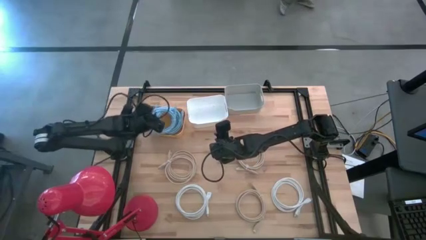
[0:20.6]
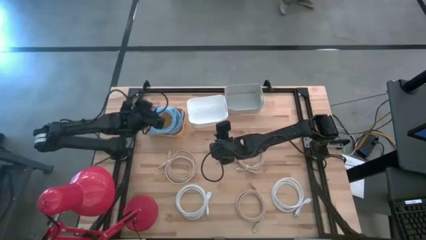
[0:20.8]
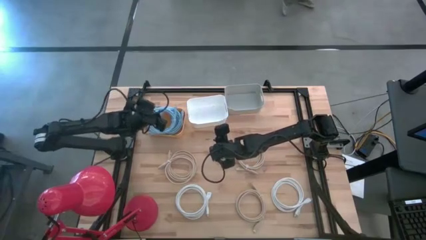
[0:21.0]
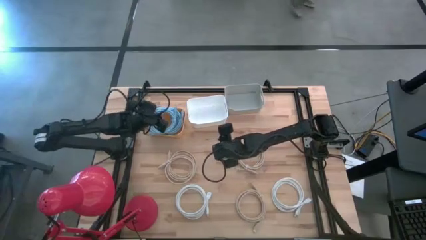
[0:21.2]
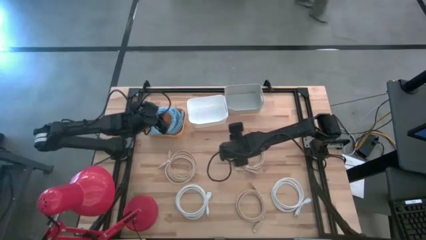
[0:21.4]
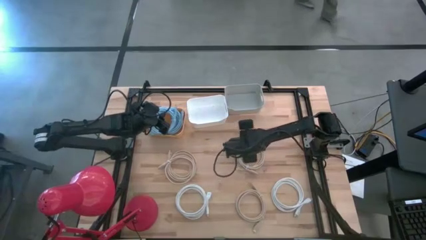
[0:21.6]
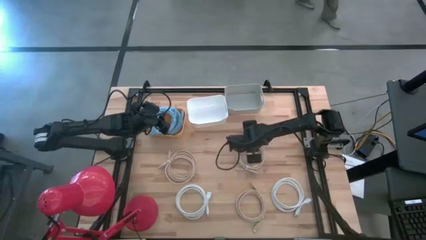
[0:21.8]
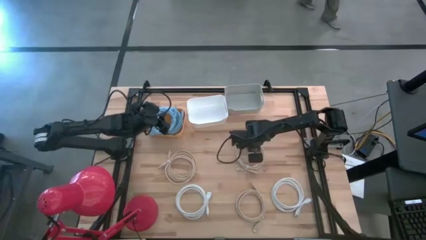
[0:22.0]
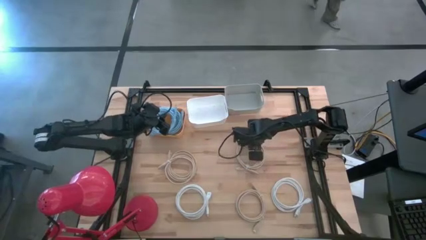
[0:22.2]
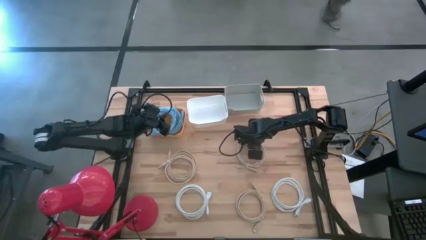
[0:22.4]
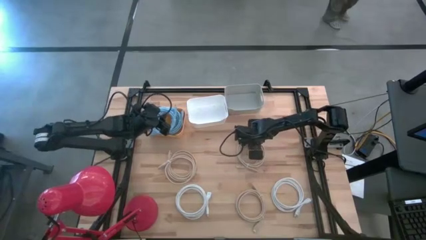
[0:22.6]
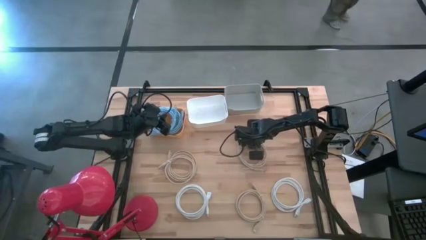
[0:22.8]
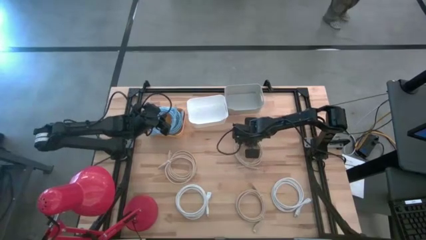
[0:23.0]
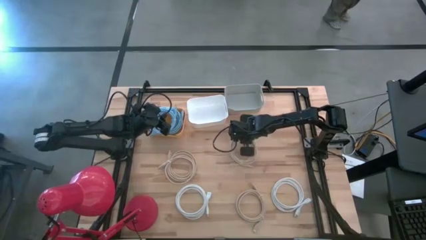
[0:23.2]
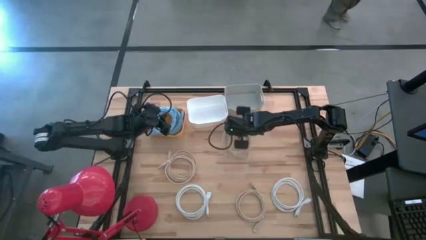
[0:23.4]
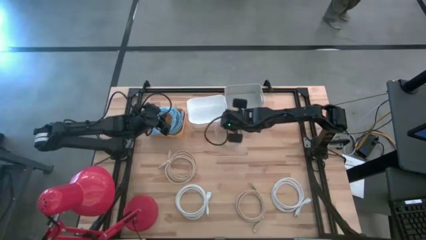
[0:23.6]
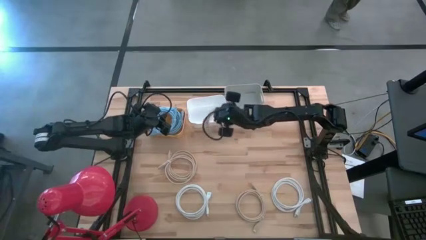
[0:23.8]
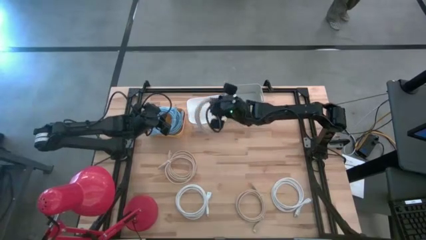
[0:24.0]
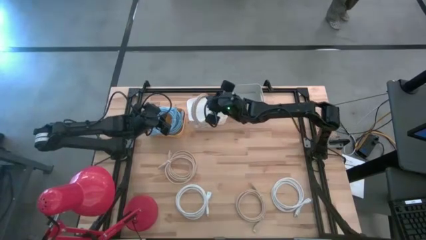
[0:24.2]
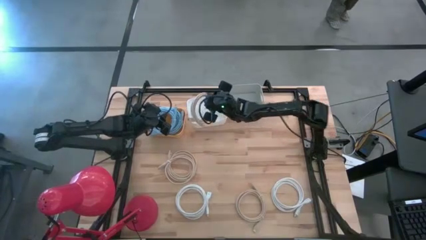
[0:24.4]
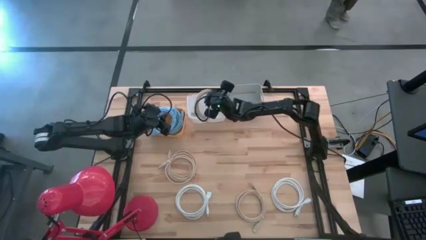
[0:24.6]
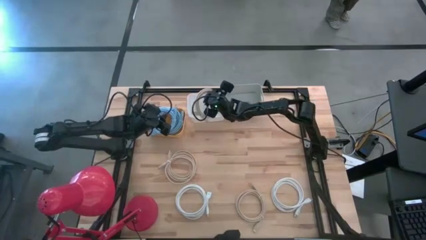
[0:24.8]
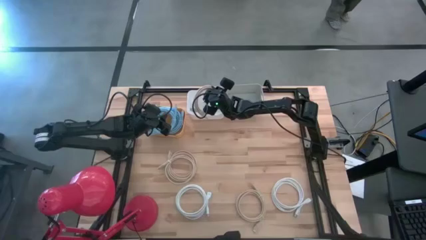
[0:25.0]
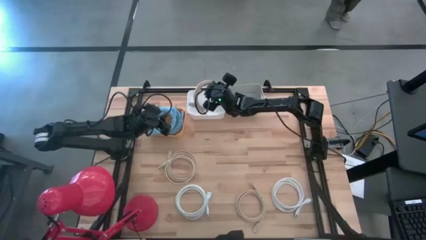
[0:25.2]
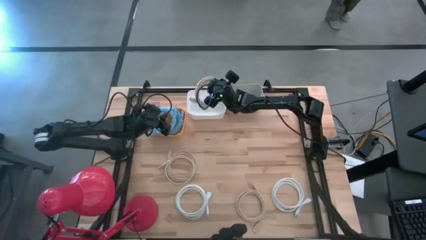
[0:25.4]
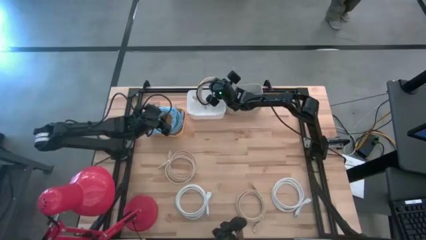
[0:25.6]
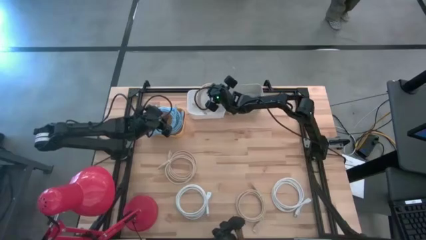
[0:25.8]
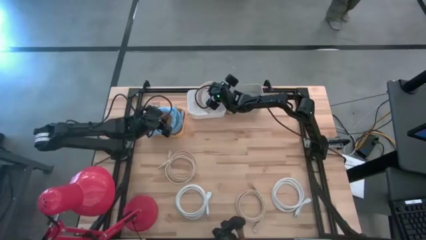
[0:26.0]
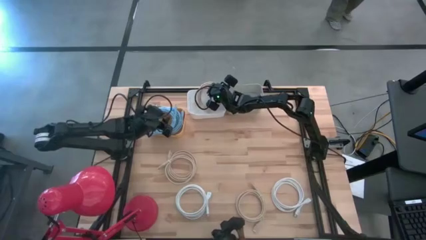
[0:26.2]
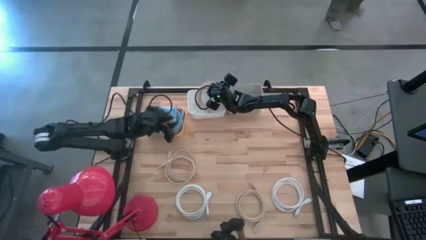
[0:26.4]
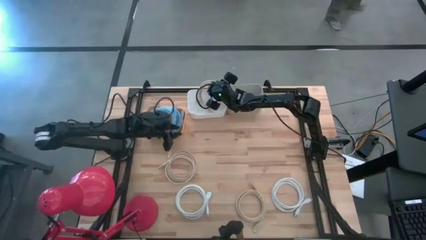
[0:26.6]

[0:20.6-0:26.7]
Task: Sort HDMI cables
Put the top right brown HDMI cable into the white bin

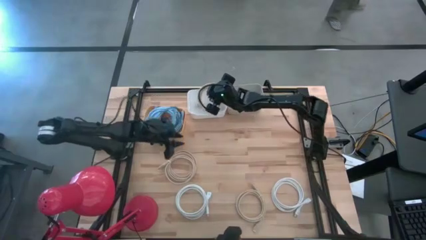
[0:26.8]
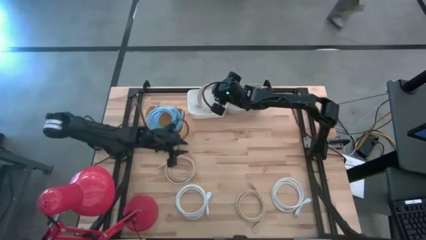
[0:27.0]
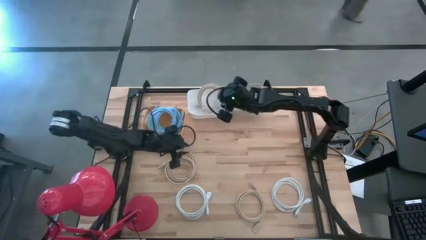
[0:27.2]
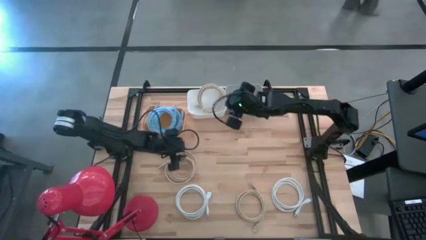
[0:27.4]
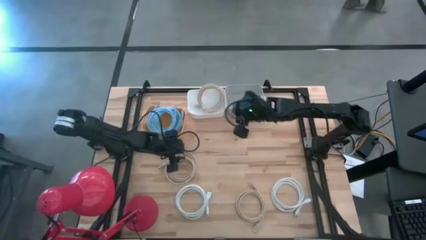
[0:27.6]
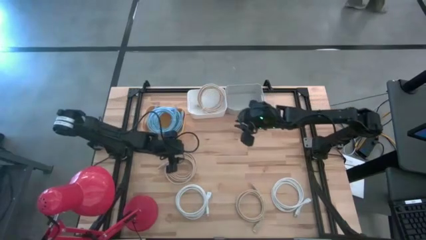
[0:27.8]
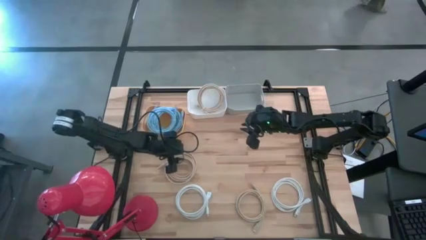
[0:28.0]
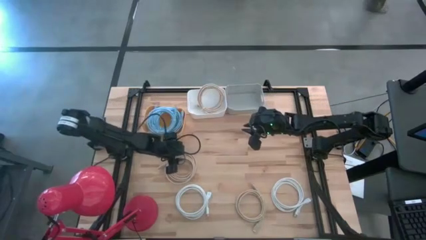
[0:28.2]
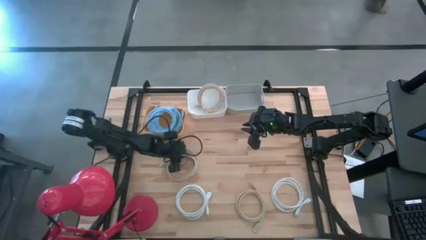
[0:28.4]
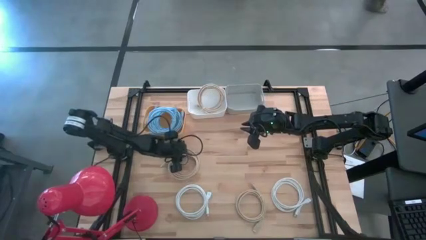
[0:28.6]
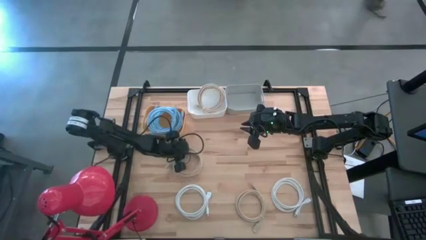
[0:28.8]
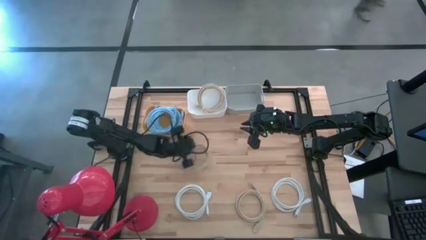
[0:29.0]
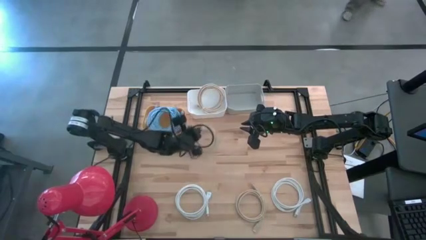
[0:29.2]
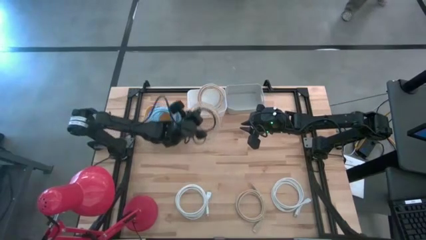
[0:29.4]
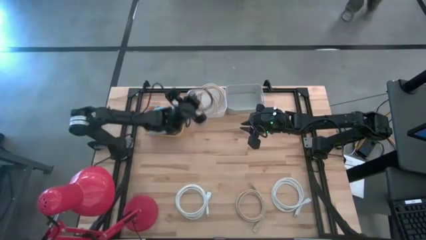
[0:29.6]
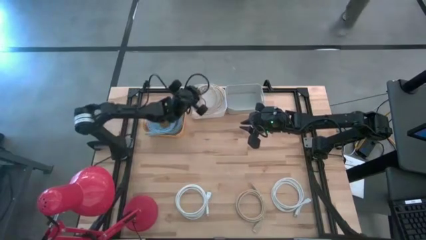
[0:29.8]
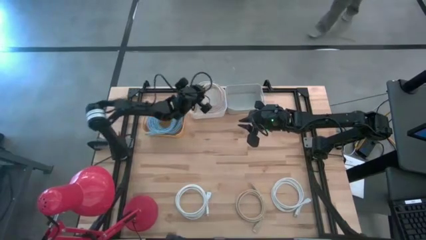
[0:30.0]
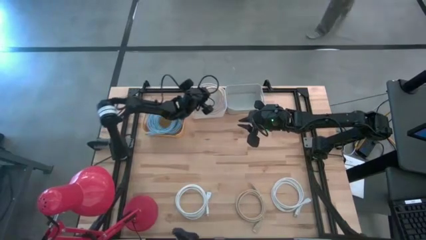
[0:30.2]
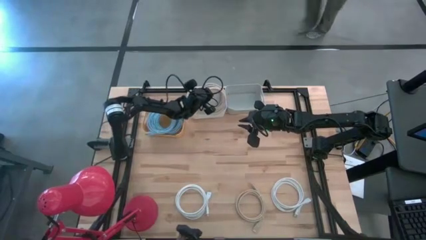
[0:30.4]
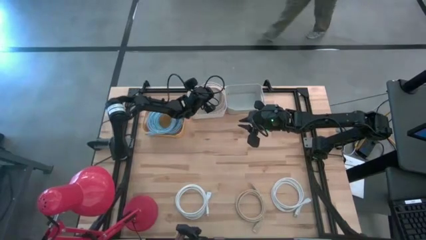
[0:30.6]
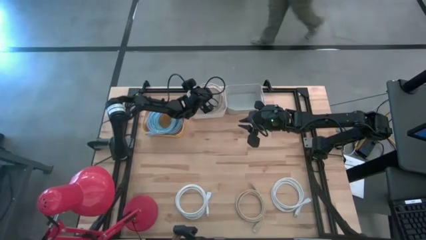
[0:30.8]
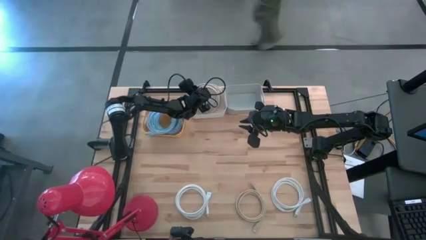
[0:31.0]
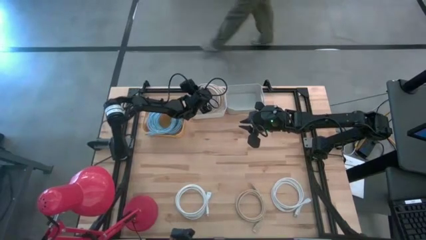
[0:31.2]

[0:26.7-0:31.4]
Put the left brown HDMI cable into the white bin

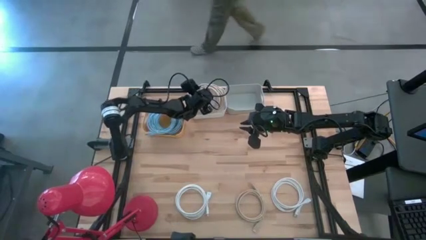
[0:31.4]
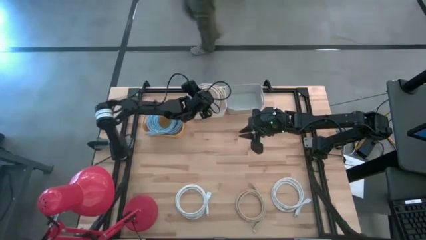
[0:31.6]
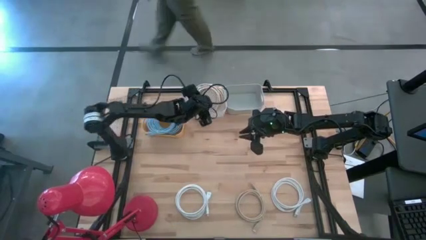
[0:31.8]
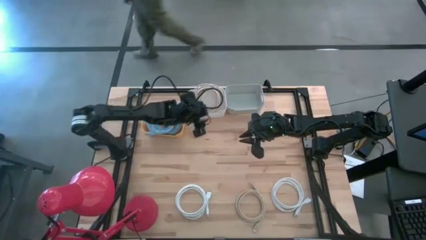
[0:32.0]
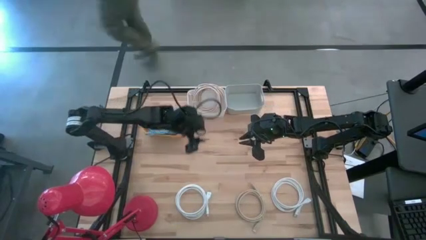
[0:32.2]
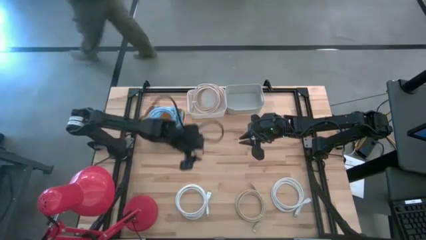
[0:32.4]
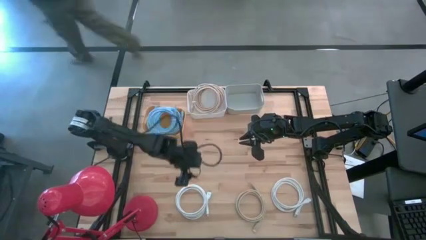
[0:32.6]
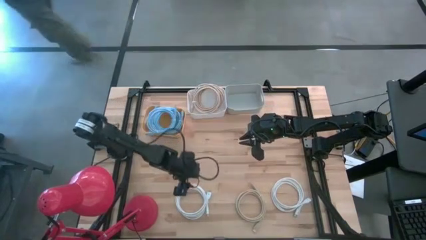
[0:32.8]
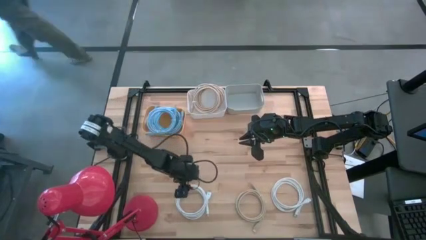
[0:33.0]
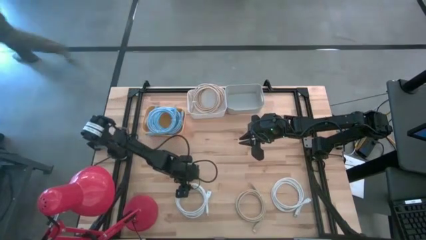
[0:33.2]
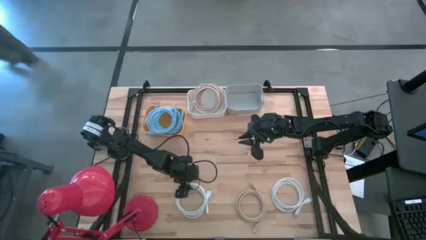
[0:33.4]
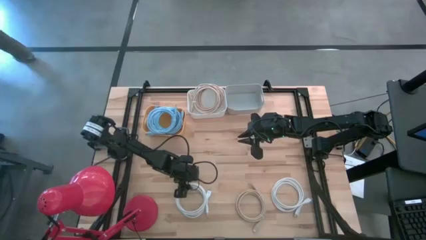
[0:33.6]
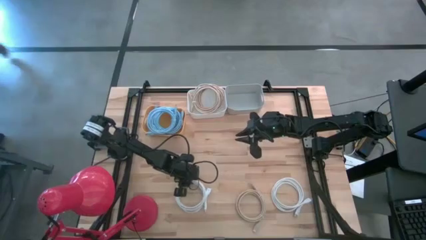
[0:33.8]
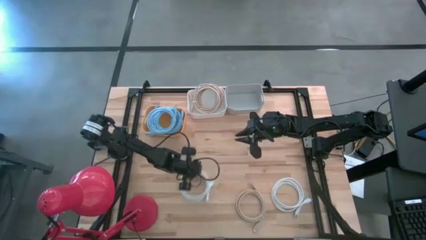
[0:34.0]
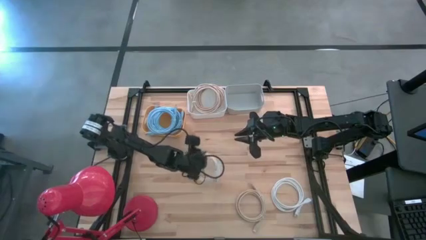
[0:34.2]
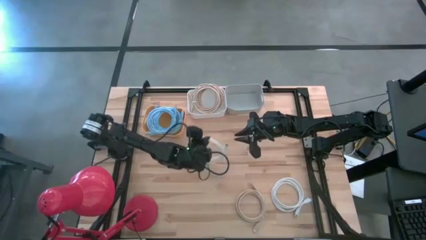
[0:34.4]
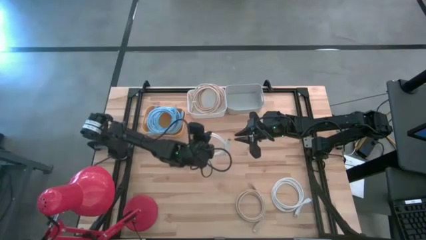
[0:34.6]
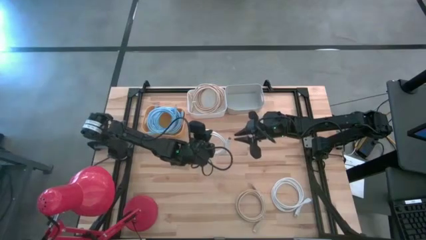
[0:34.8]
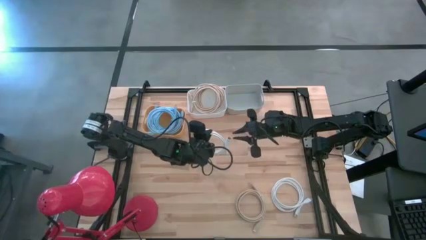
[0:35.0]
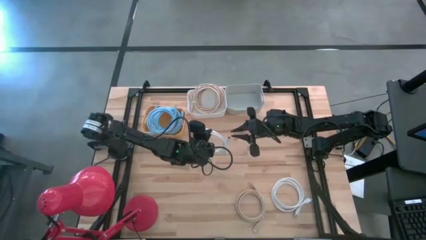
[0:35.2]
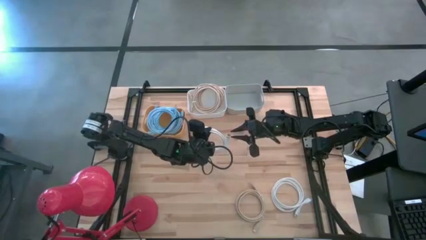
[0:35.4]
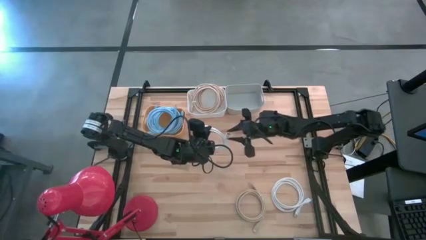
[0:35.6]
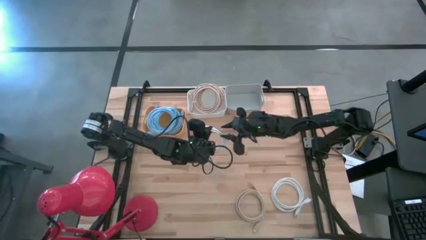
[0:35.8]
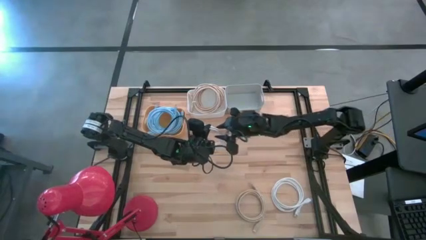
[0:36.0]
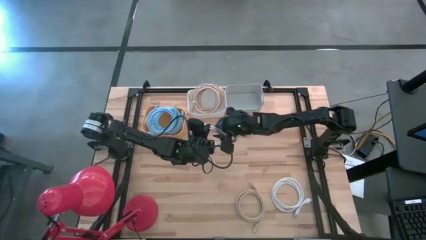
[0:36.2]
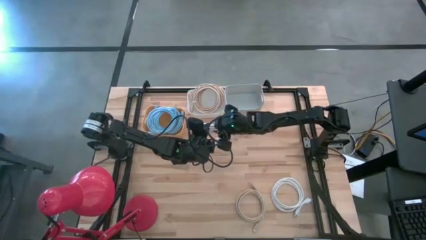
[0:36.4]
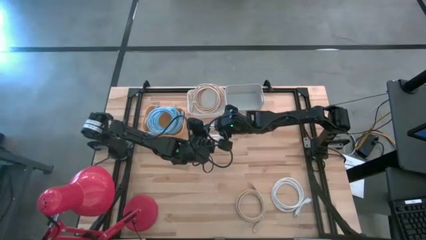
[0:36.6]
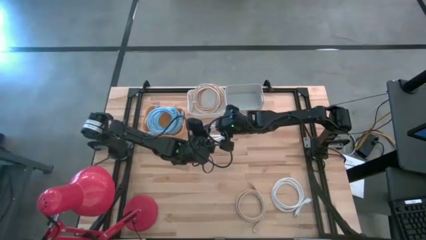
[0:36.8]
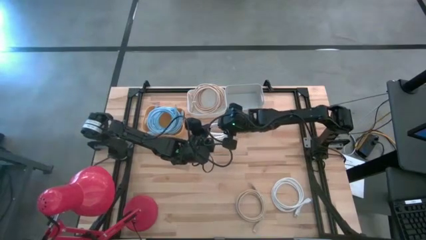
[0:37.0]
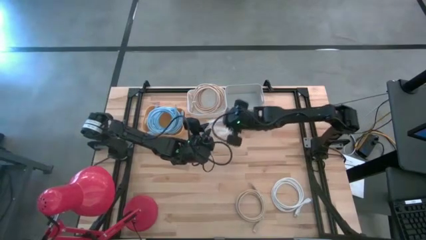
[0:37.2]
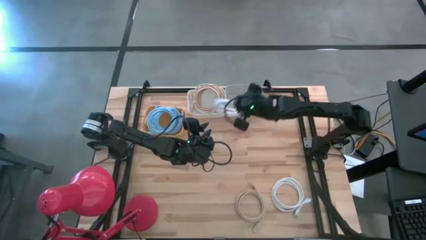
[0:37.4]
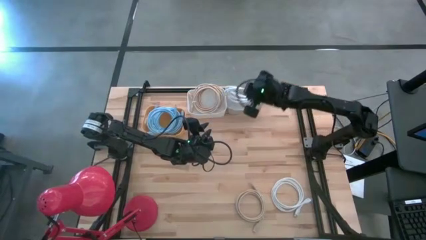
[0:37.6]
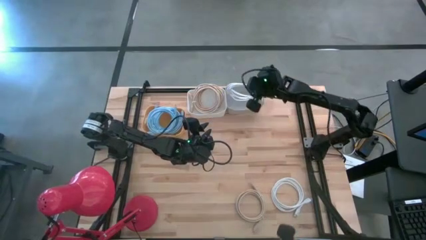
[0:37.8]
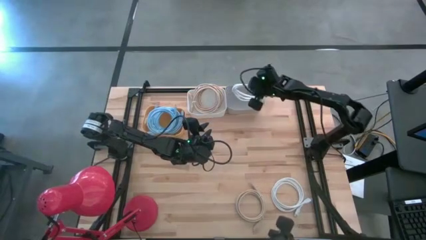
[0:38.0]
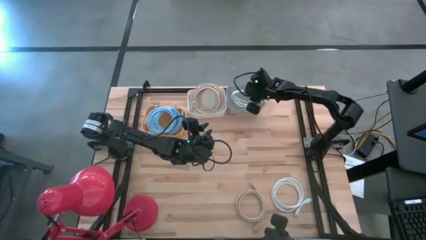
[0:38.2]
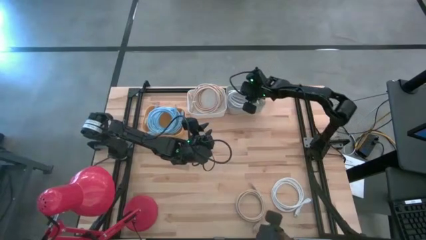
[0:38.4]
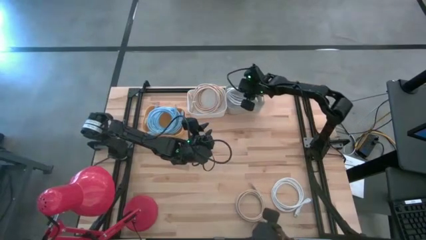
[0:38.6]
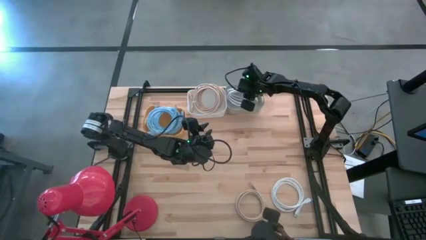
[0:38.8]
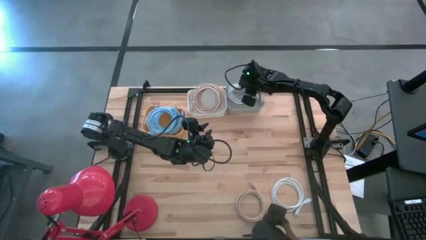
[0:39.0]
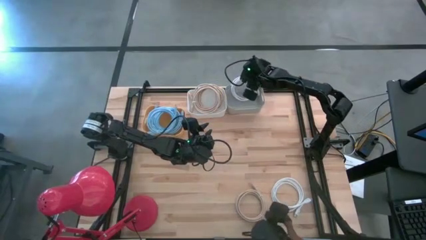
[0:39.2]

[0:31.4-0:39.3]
Put the left white HDMI cable into the gray bin
